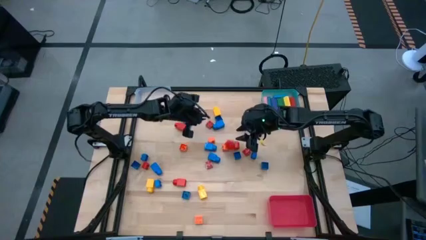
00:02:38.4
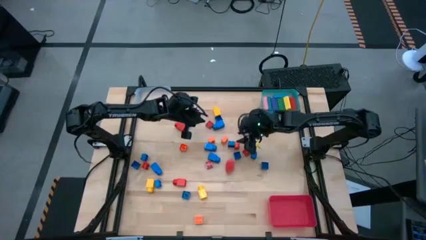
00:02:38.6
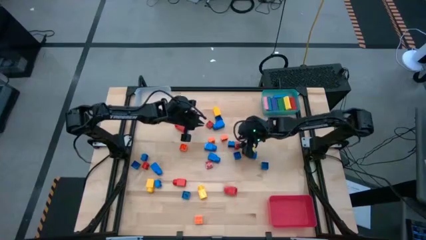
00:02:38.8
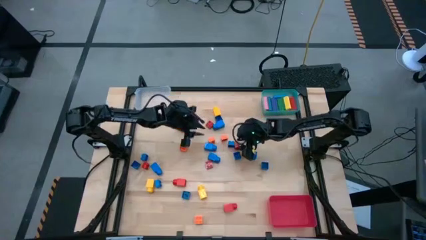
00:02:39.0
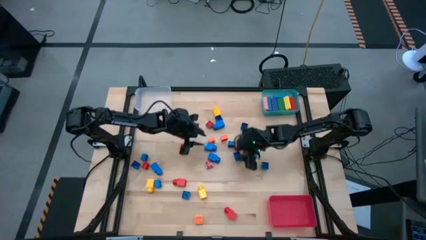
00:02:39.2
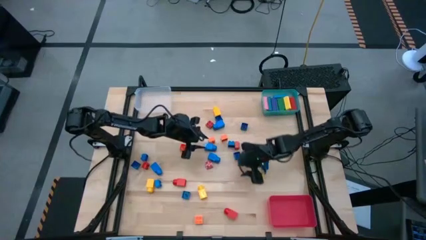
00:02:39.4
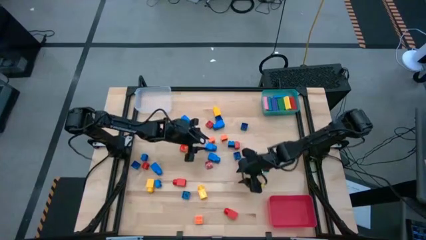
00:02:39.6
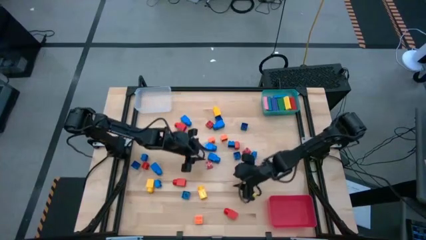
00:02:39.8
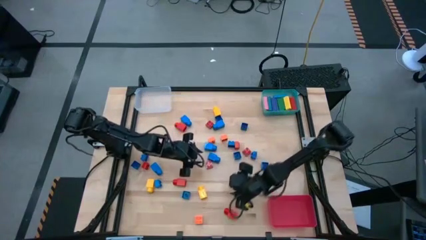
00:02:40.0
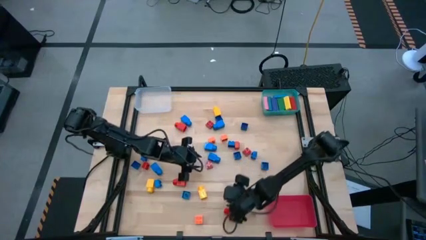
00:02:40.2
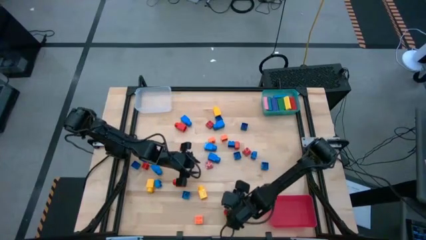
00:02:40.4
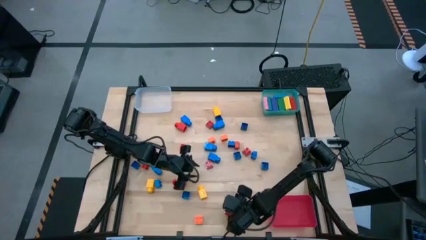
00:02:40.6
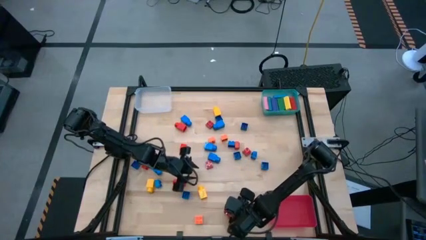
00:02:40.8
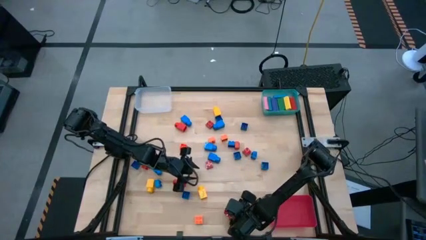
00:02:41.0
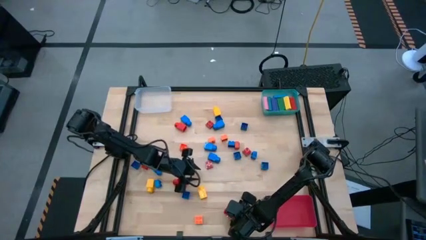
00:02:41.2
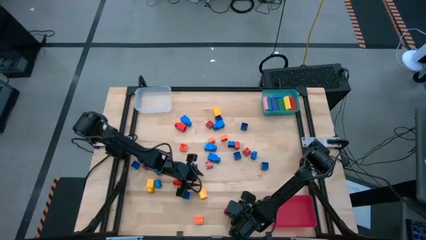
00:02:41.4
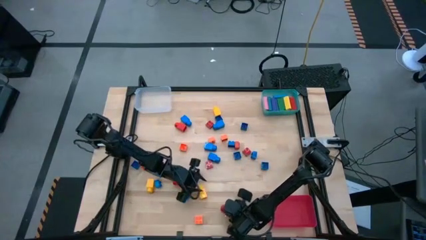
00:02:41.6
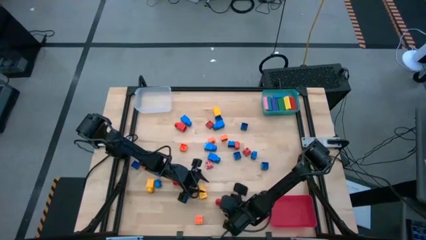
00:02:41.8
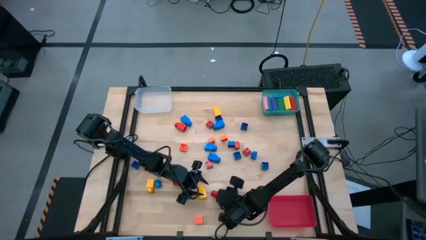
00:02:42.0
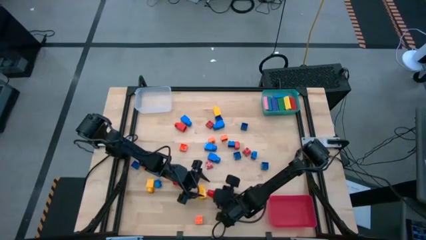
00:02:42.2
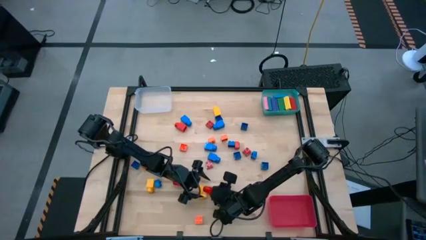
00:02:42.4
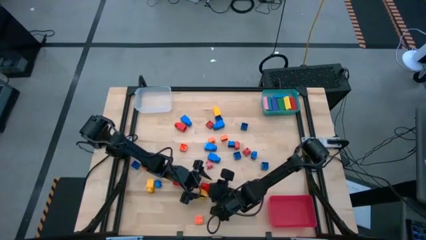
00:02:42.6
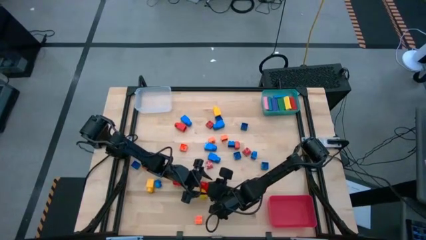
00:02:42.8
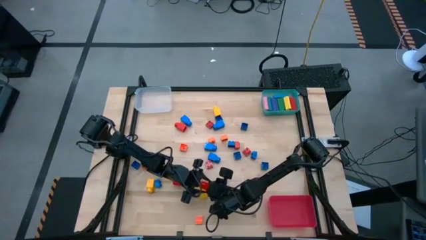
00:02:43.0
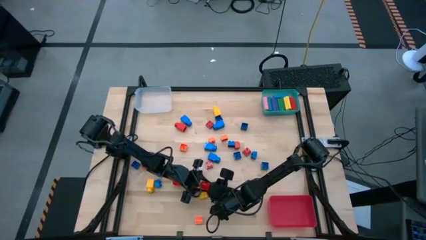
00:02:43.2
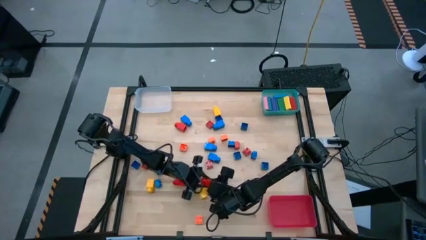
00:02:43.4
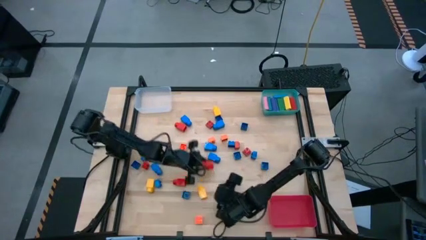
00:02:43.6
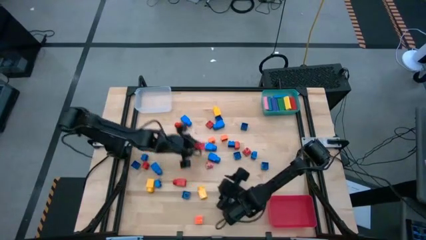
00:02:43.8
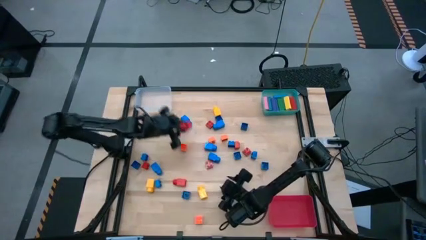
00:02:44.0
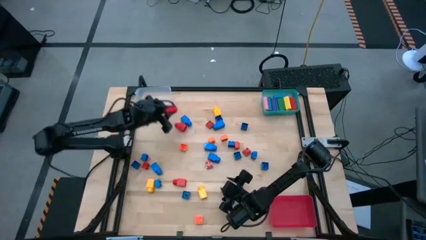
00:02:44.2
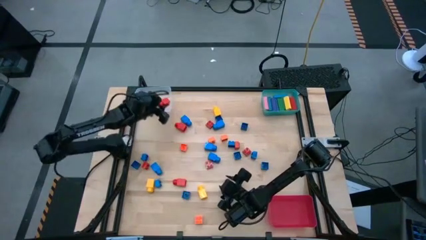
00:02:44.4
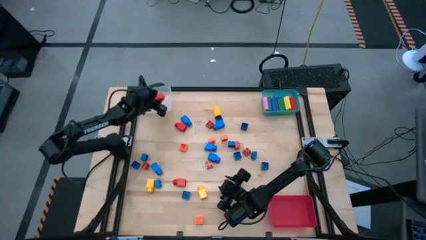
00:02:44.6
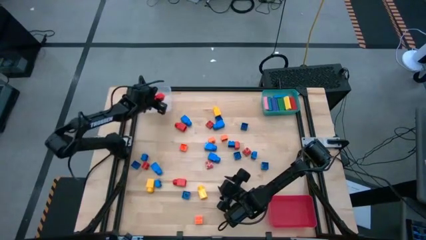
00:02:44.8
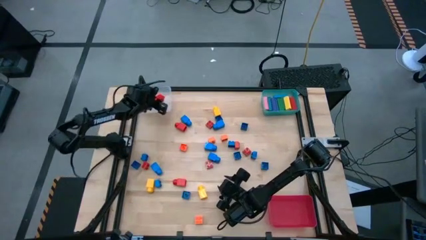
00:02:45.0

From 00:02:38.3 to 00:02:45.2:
Task: Sort blocks by size
Put the big red game piece into the transparent bin

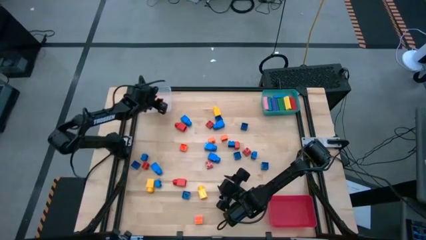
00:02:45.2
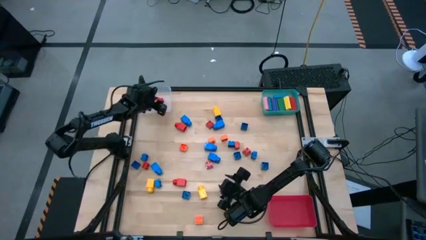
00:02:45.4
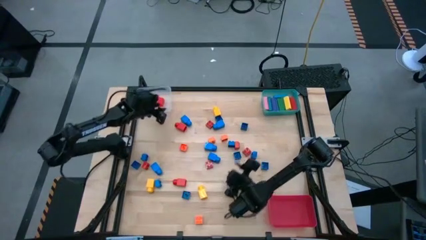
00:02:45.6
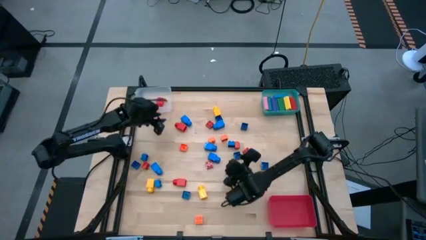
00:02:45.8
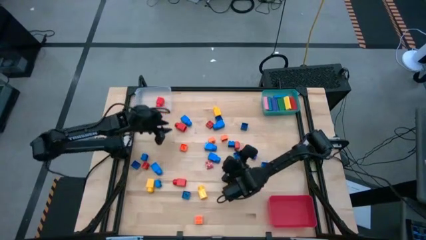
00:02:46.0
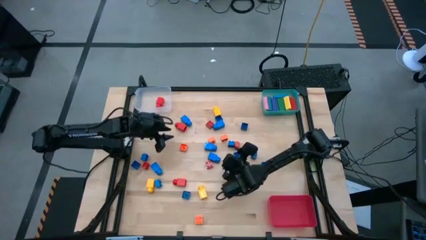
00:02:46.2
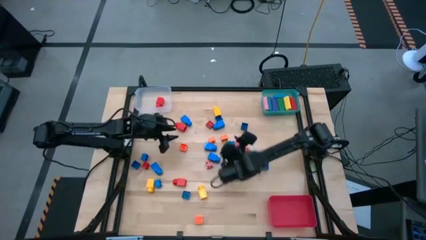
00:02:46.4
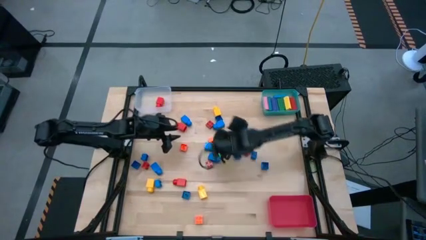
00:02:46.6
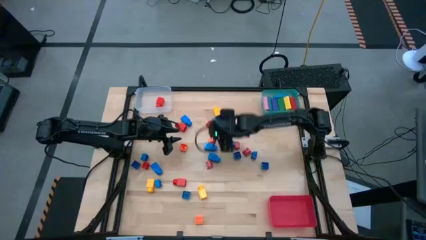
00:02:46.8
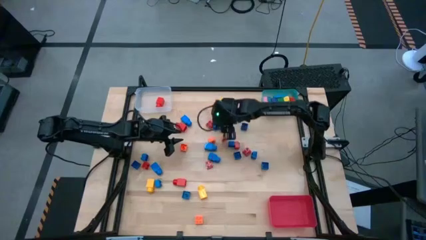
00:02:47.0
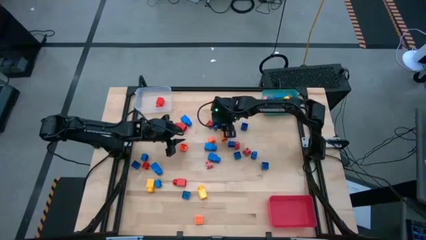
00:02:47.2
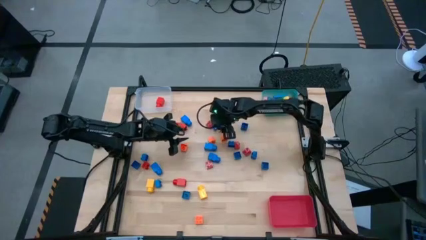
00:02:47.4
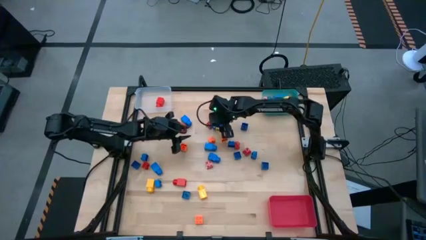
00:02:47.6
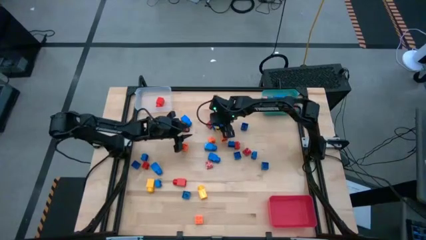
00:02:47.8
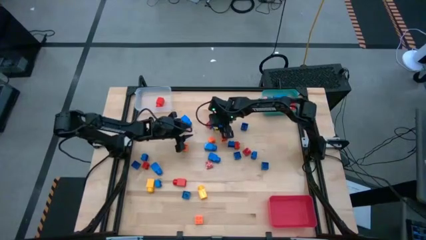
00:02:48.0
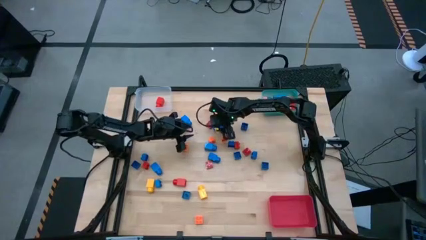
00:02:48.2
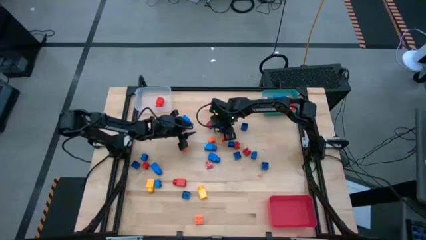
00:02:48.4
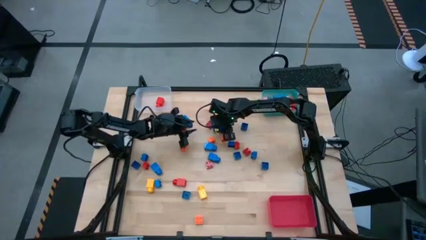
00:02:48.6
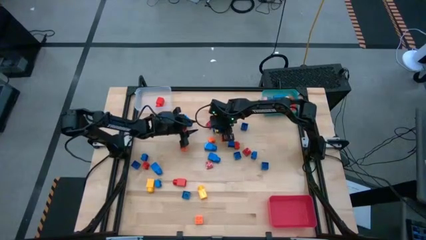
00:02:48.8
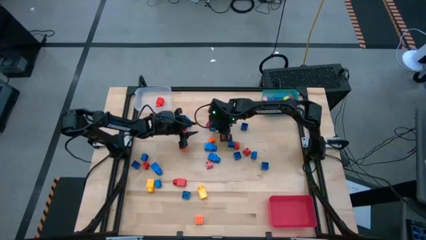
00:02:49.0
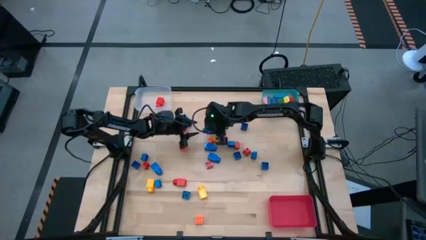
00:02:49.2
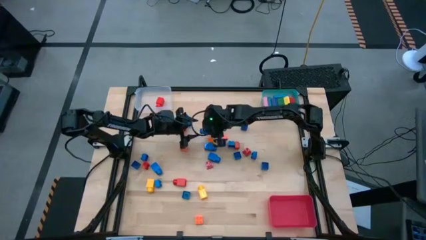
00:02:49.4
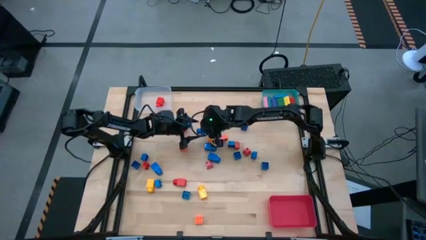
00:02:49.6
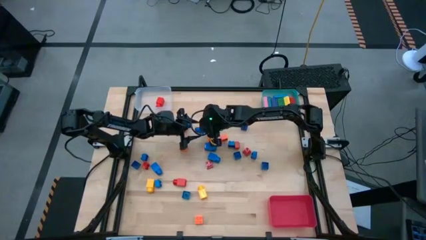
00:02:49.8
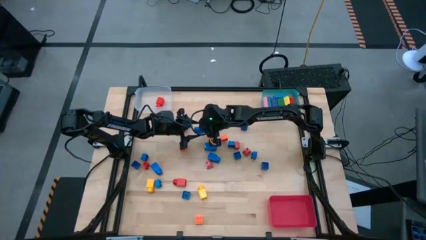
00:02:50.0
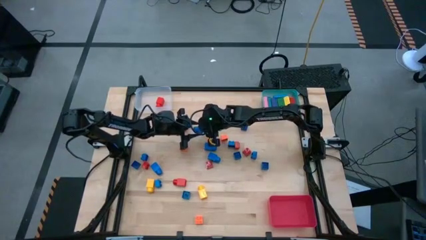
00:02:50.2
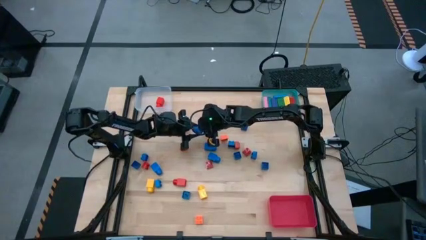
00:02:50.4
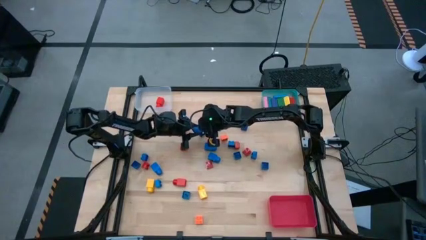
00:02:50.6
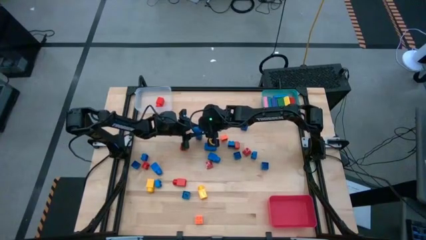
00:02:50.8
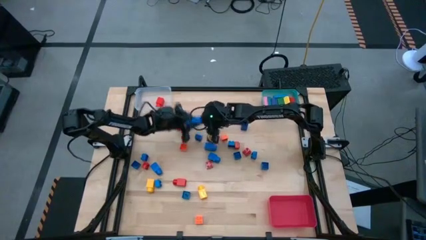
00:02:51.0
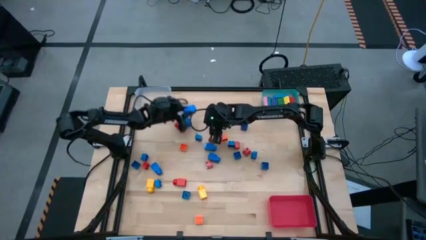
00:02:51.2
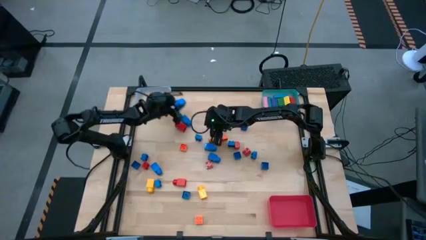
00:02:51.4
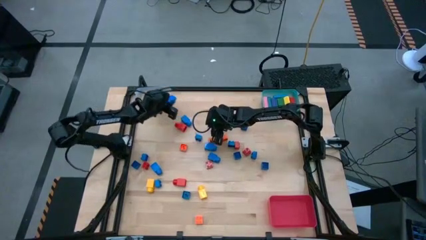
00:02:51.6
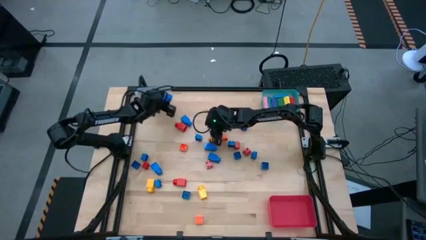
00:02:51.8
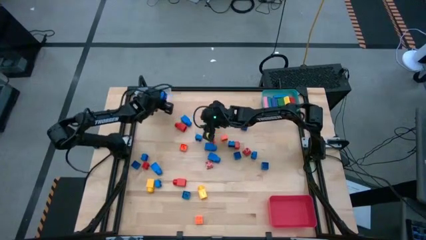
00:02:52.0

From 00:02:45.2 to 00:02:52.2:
Put the big blue game piece into the transparent bin

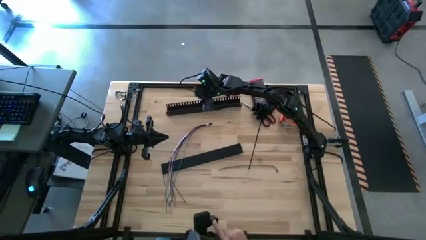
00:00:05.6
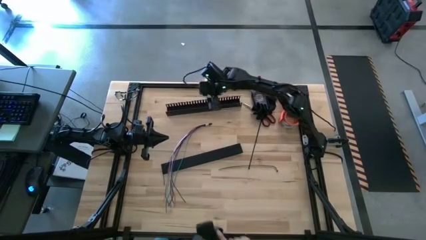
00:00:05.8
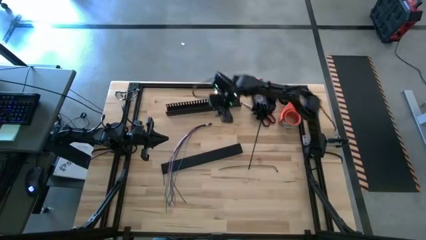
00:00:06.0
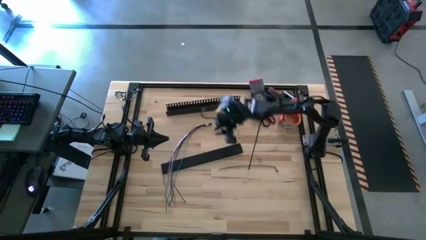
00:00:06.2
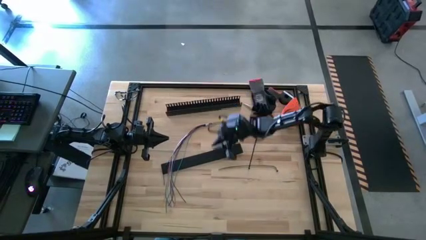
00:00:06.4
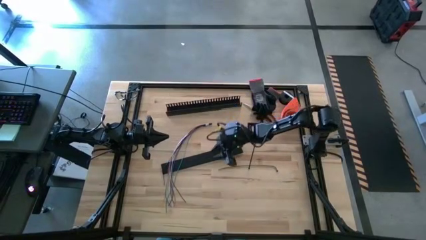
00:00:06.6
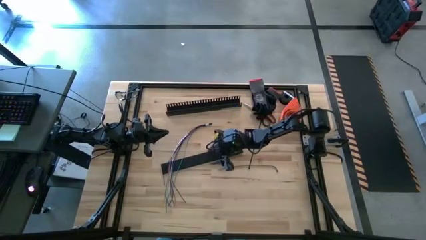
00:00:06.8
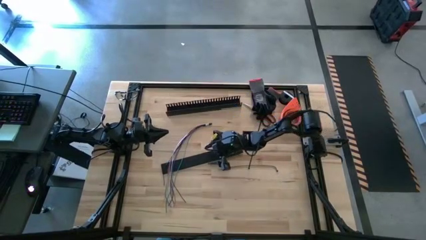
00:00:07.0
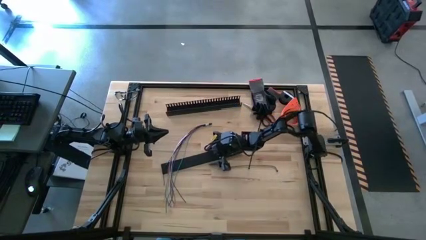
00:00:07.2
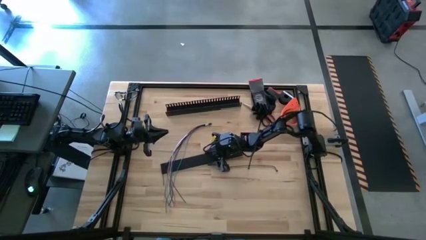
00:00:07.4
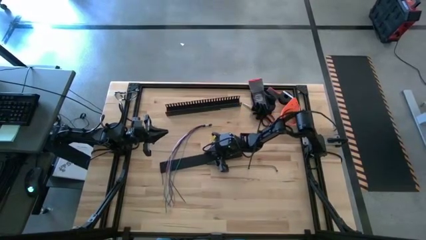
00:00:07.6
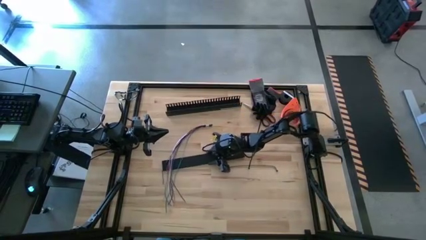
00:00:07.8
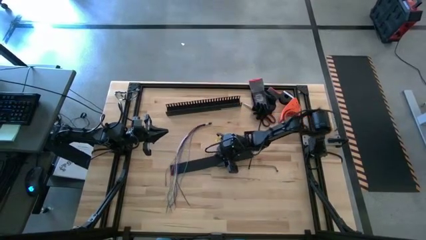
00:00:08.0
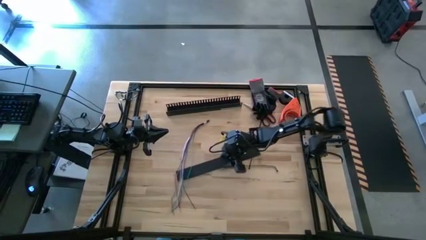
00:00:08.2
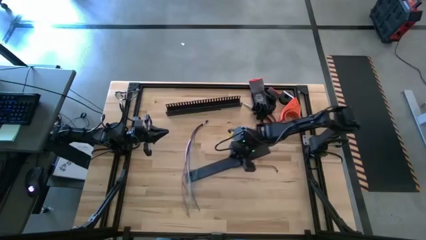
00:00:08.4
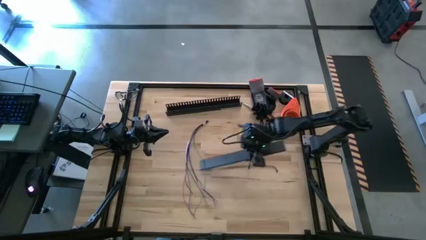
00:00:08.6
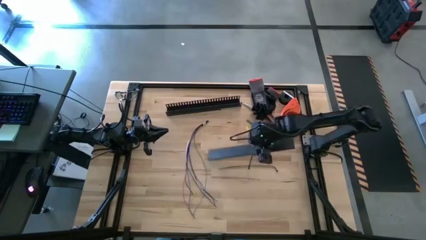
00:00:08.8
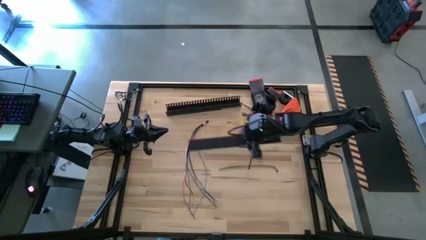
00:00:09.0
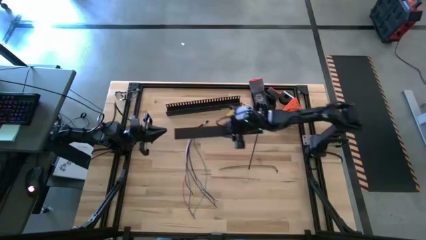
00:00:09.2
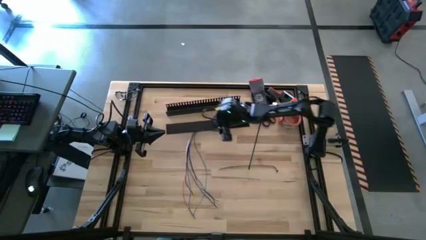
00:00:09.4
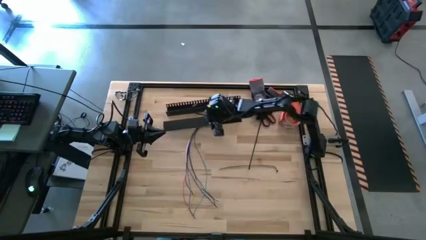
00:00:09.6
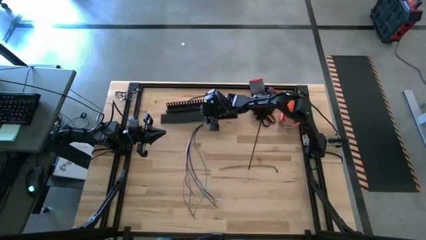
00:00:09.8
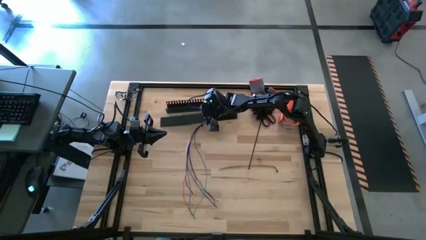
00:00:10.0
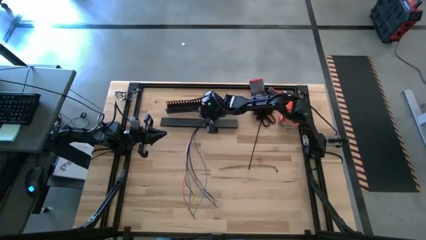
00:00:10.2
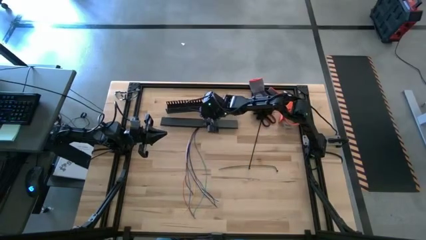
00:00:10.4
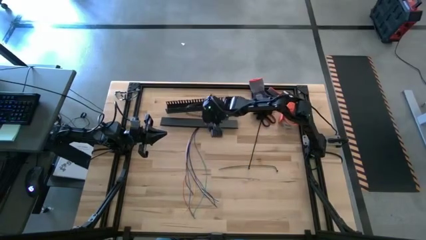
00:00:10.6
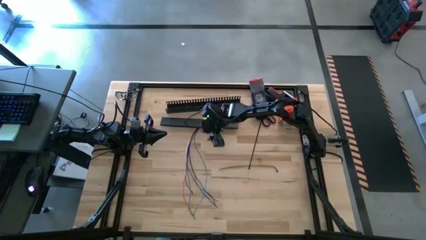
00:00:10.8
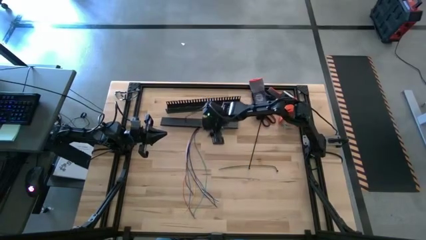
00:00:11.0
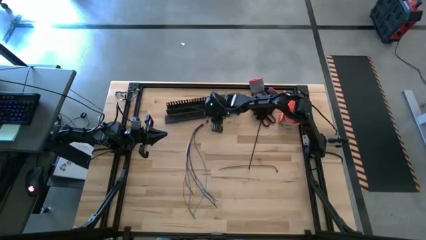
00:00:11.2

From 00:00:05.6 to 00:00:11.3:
Task: Ziptie cables
Move the black lid to the bottom of the black cable duct
